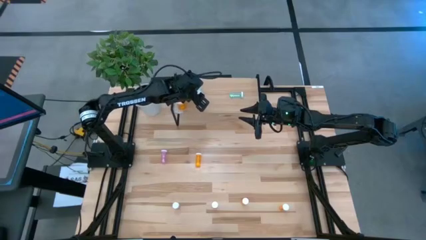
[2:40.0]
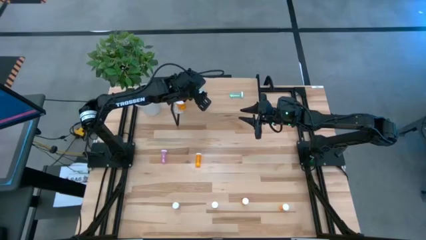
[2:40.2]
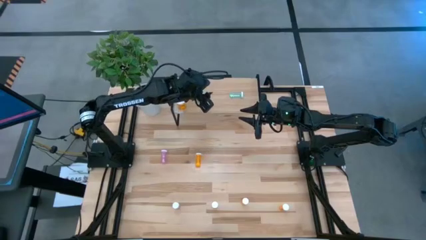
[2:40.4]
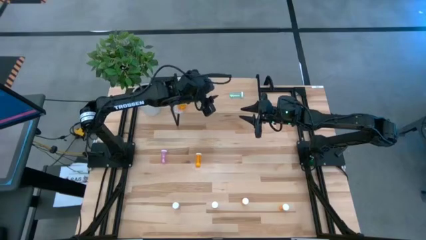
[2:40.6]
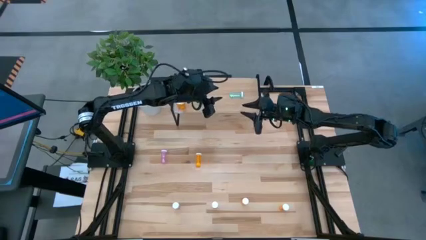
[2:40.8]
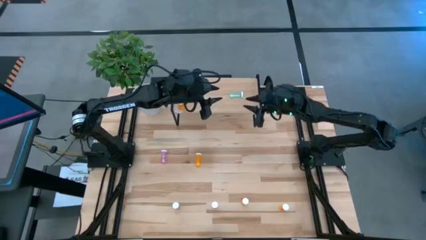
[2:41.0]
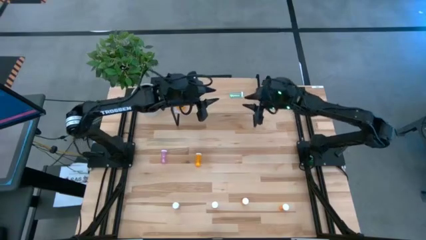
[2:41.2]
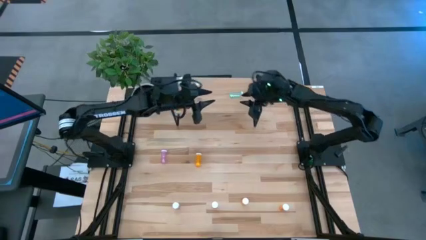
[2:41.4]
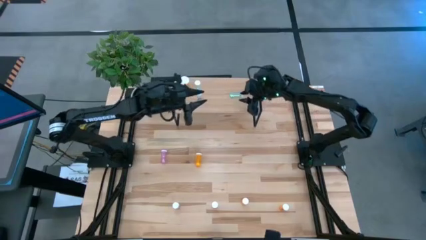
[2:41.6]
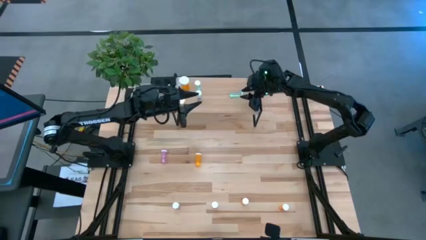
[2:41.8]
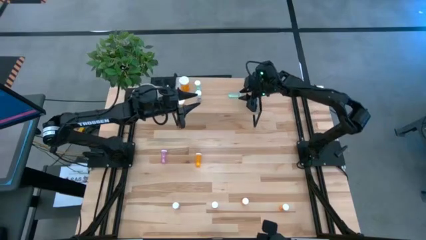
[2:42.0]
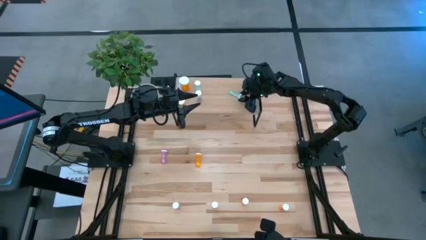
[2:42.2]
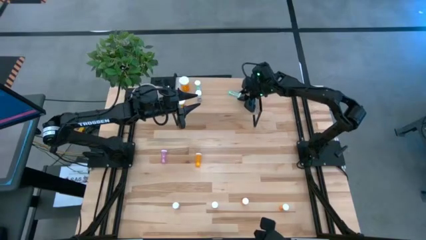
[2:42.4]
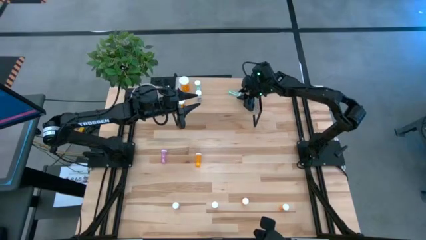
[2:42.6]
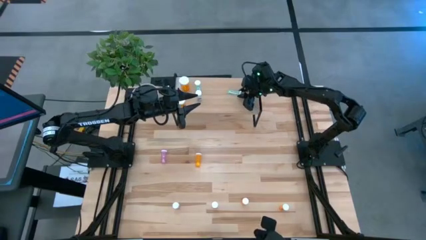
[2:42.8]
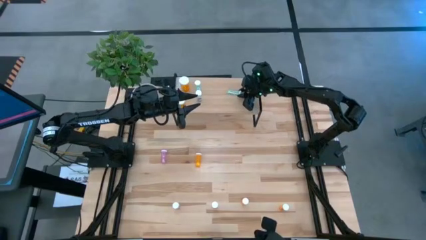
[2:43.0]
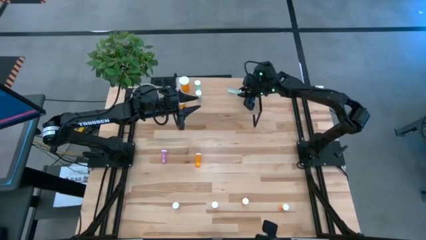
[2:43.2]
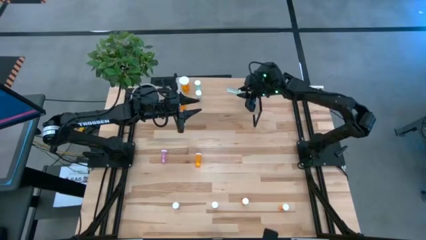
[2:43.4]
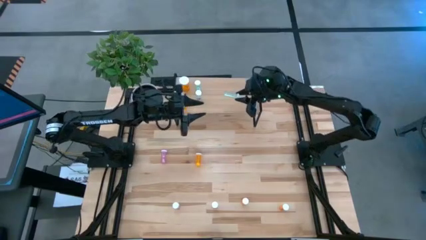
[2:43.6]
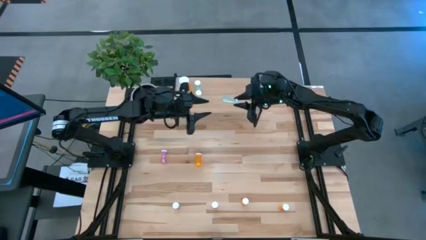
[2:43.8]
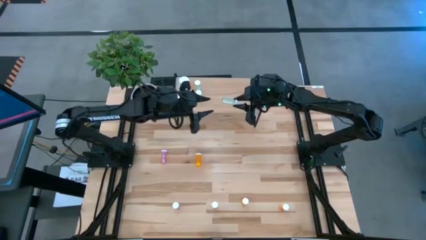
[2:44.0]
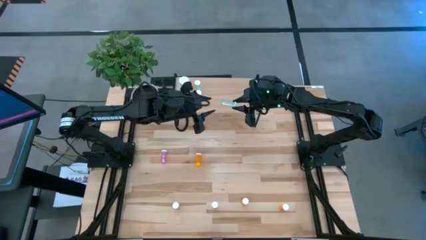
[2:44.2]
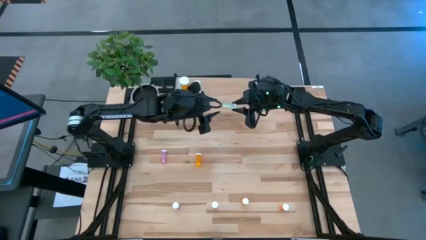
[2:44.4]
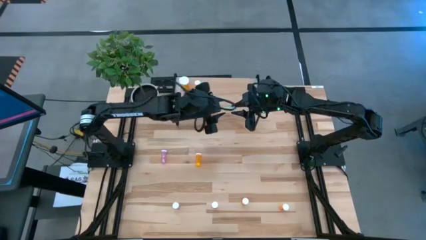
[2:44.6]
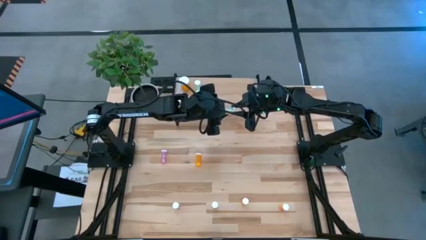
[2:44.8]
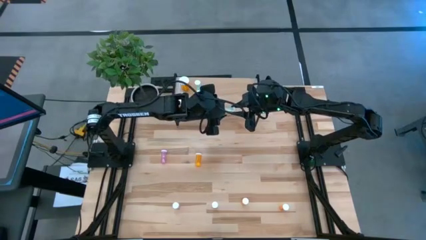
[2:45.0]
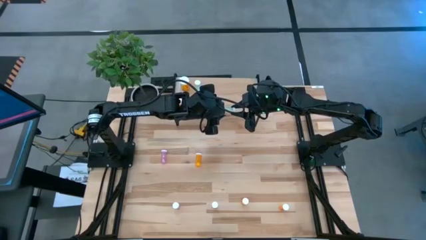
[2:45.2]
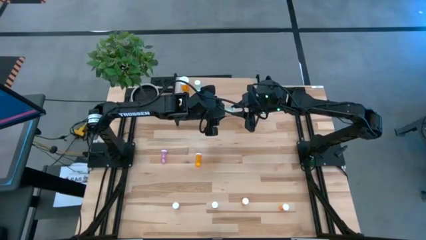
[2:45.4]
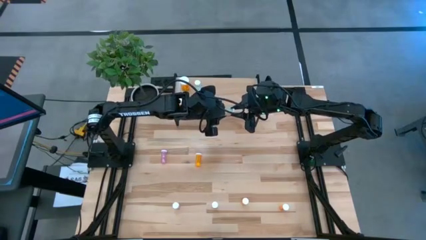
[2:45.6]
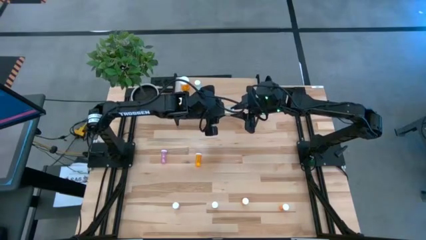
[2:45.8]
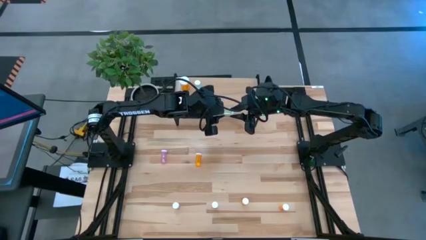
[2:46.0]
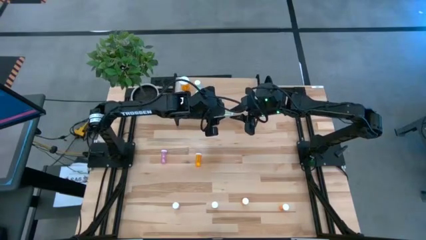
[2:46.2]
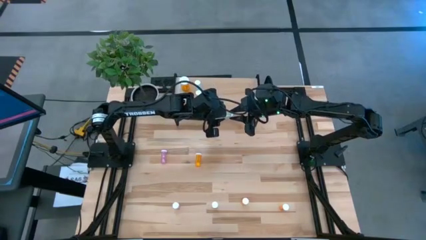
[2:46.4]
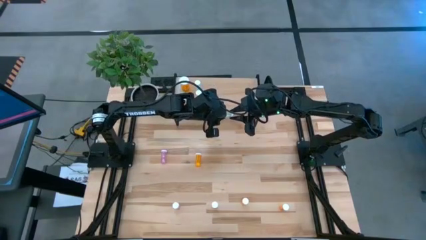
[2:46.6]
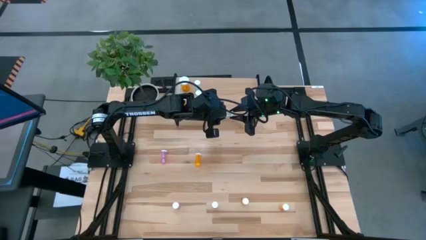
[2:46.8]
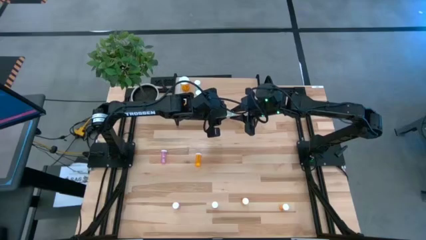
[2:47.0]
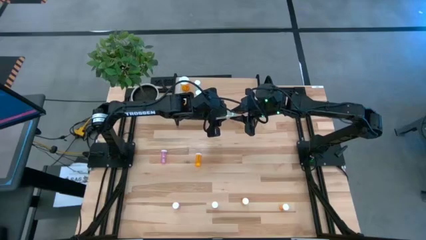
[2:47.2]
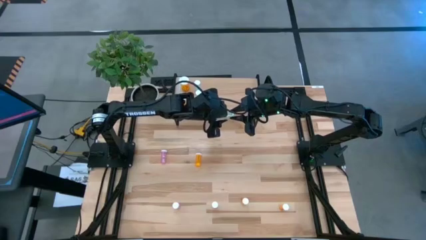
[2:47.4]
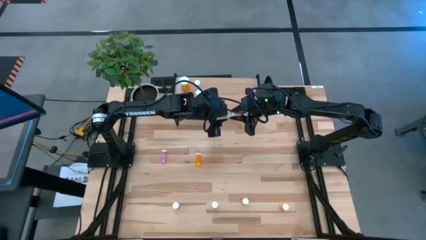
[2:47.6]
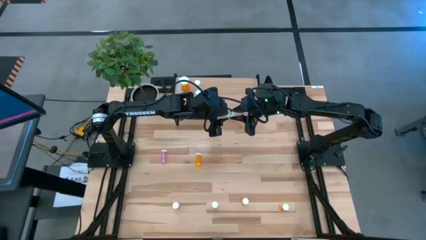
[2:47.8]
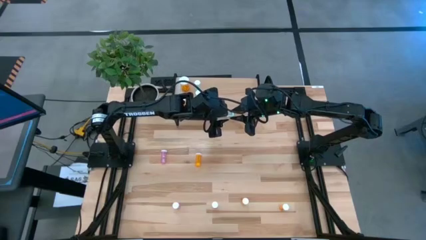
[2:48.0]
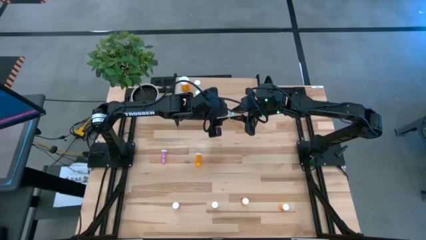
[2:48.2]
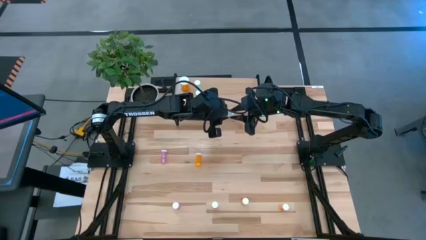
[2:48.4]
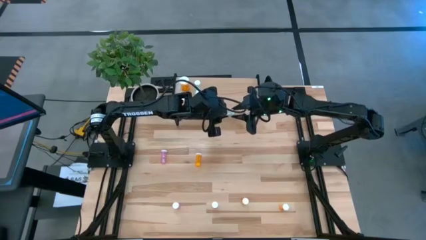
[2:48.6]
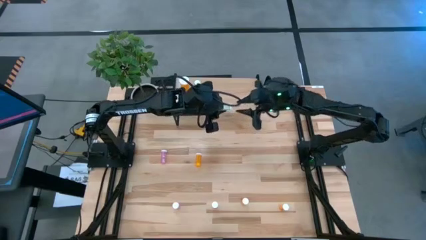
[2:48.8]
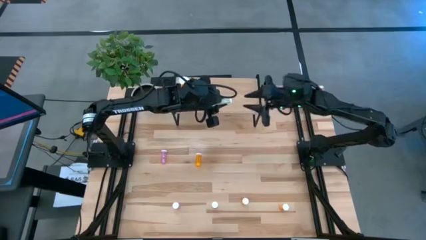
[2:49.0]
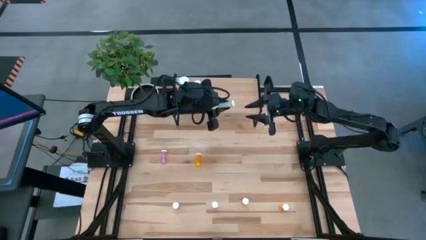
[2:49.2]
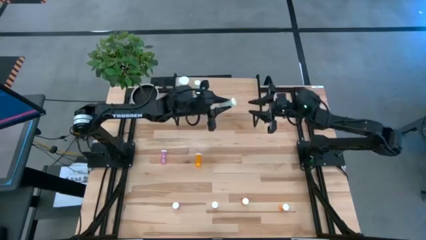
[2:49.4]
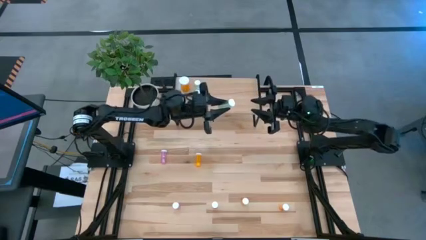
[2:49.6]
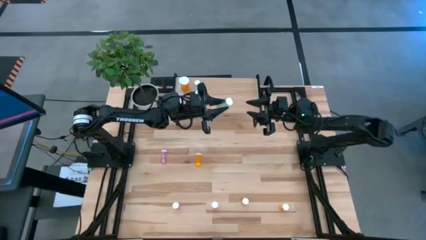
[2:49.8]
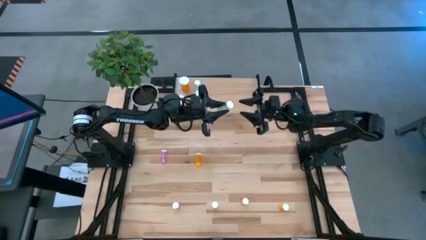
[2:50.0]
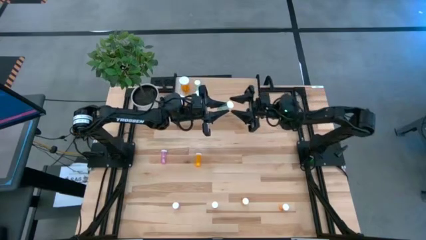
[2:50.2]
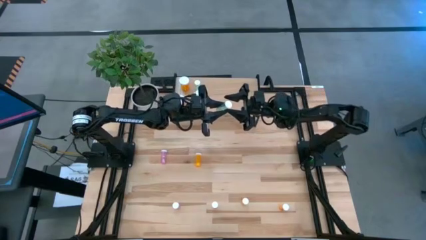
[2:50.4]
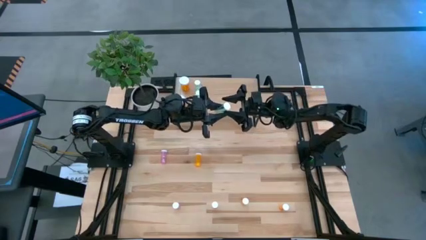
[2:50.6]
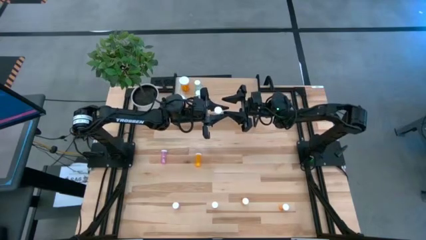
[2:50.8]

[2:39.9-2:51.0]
Task: Pick and place medicine bottles onto shelf by color
Adjust the green pill bottle on the shelf

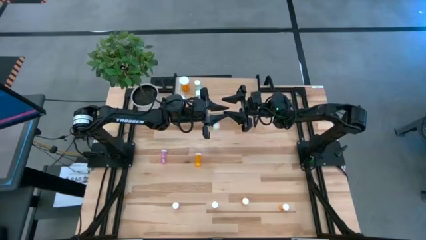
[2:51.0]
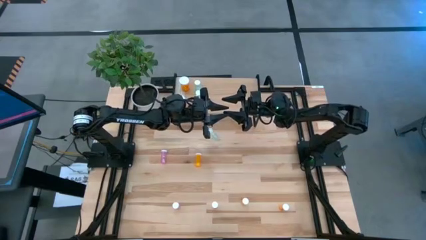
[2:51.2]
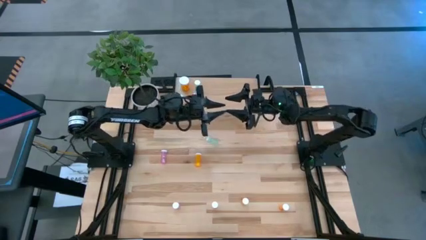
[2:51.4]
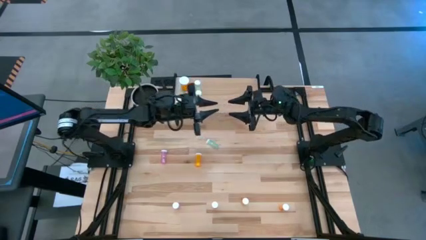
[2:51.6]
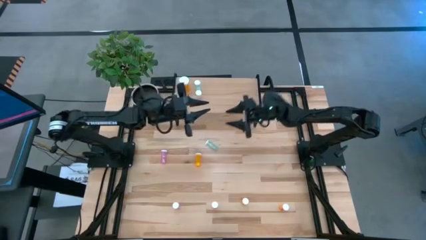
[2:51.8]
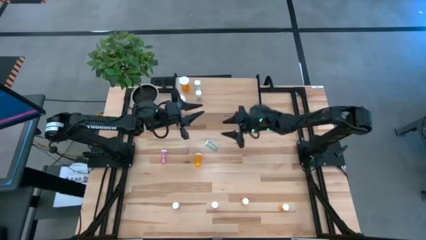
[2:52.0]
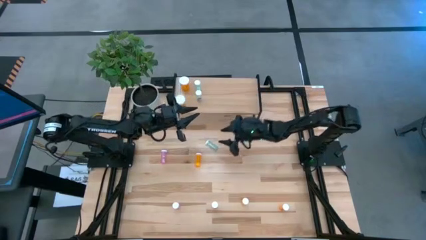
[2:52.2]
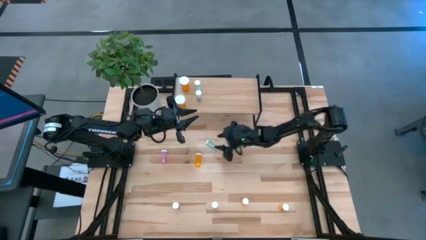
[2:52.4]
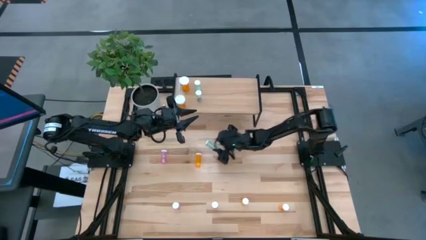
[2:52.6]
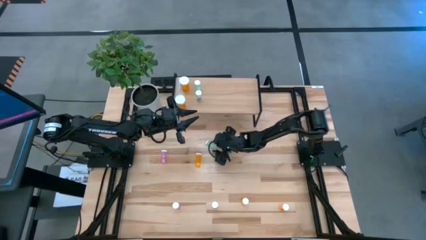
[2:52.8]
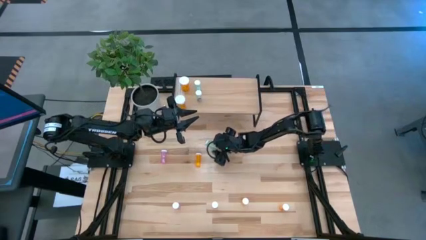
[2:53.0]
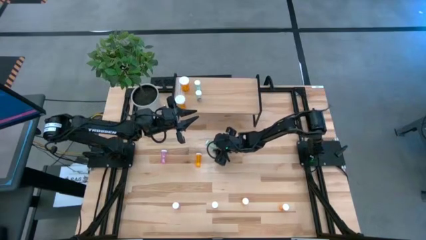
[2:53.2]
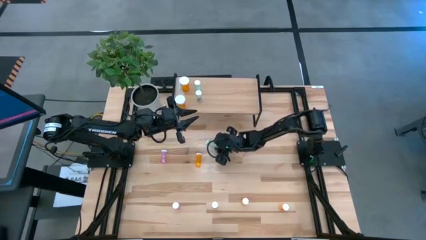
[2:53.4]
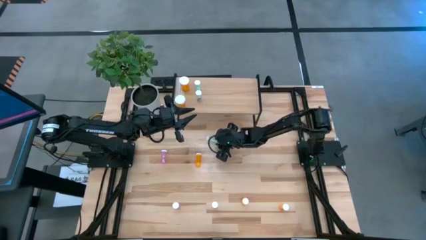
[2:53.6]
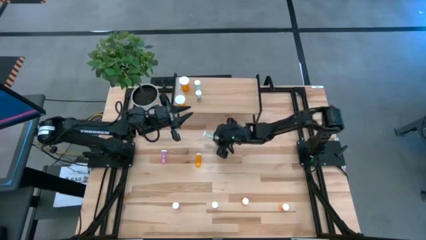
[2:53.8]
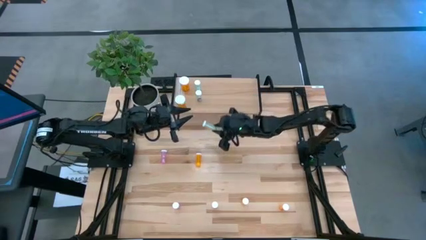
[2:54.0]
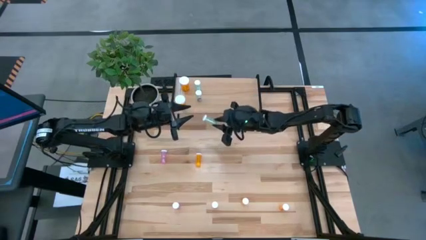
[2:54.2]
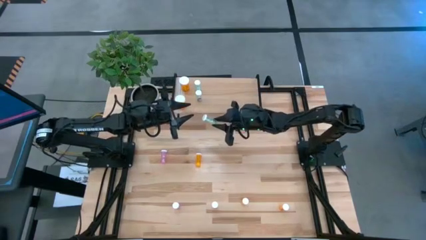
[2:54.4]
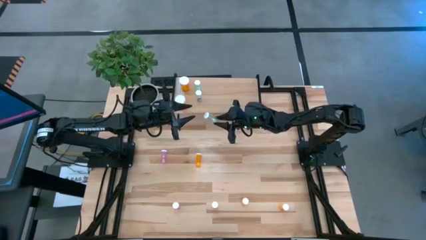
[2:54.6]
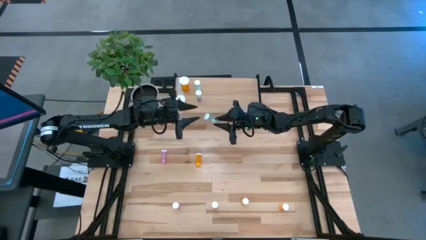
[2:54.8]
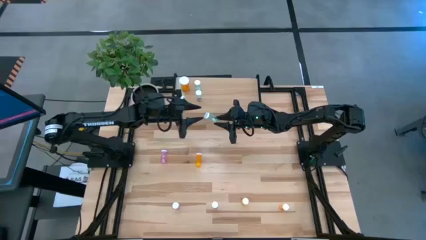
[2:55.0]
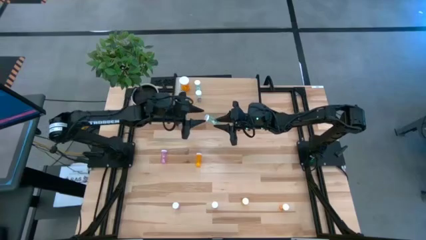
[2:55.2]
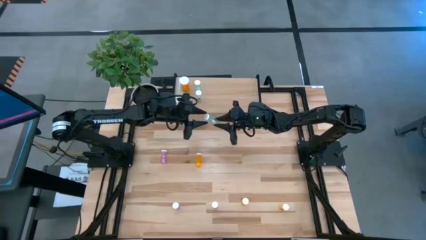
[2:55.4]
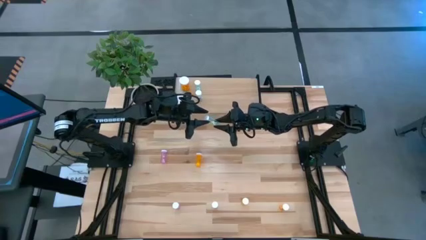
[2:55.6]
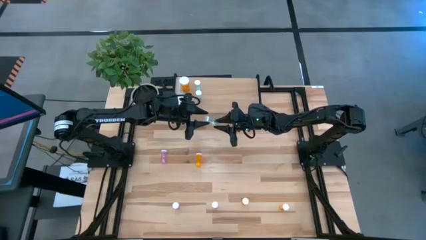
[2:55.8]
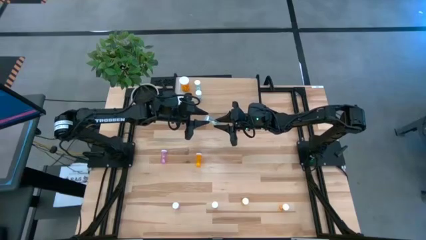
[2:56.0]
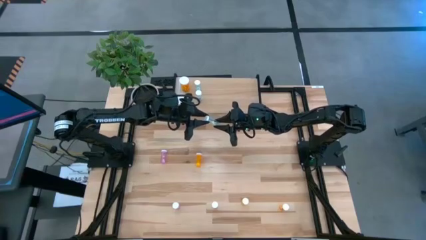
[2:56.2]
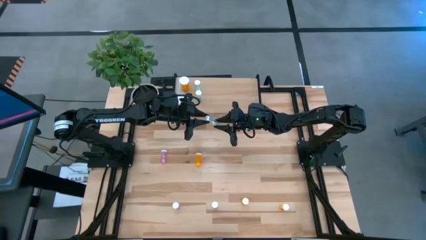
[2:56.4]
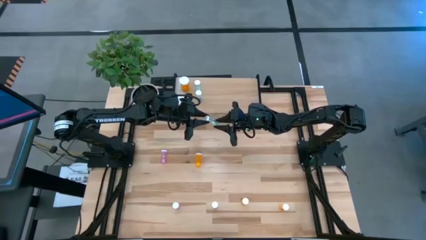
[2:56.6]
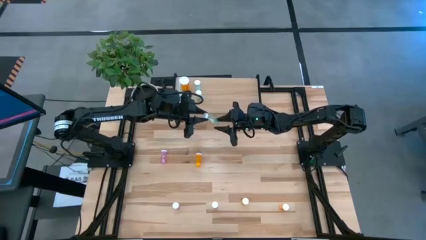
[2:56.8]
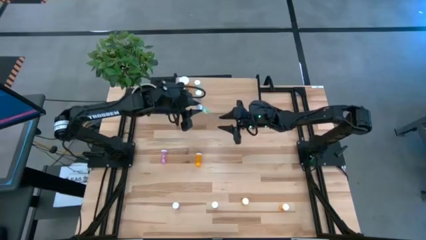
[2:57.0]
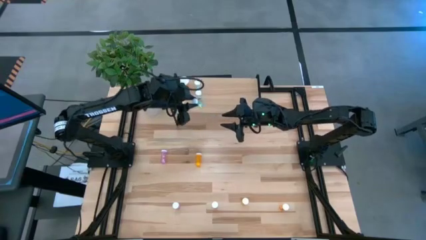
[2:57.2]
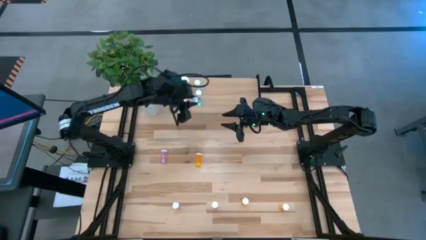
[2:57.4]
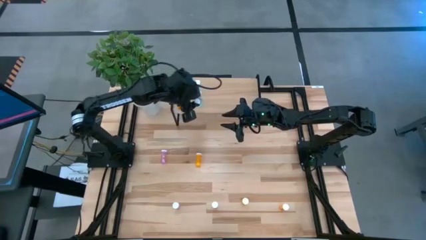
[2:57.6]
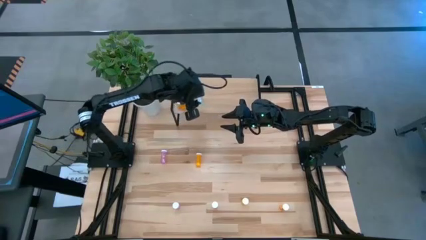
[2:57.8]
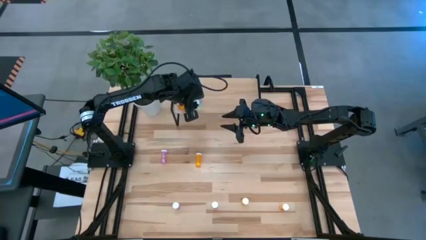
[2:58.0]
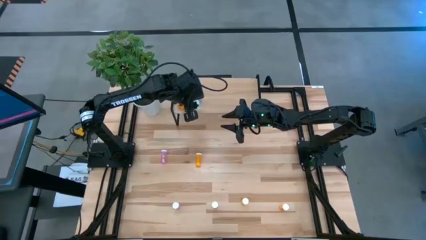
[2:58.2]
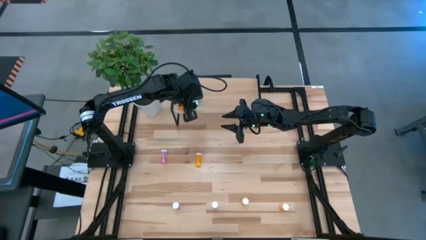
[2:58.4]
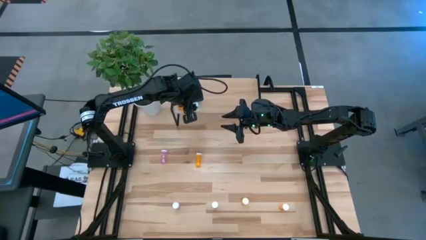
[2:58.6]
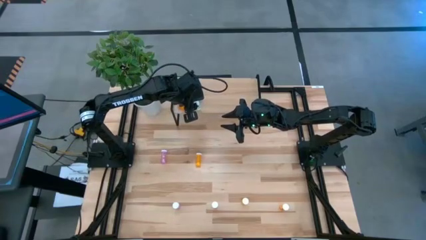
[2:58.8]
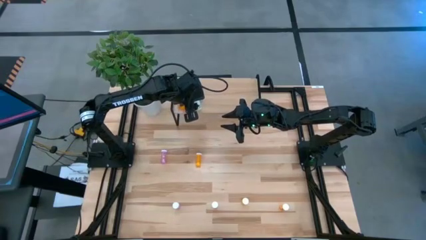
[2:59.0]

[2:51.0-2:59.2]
Adjust the green pill bottle on the shelf
